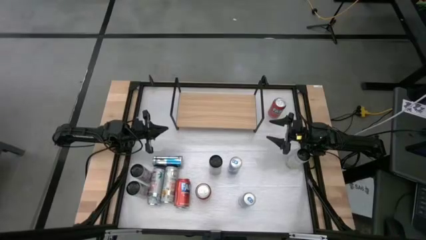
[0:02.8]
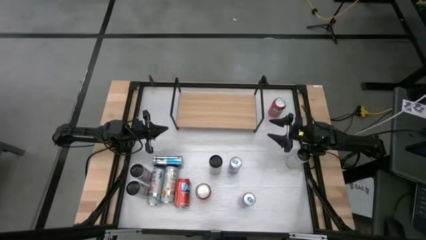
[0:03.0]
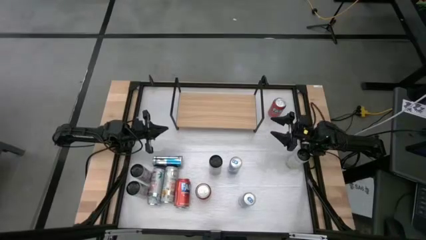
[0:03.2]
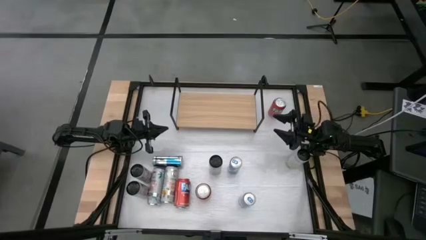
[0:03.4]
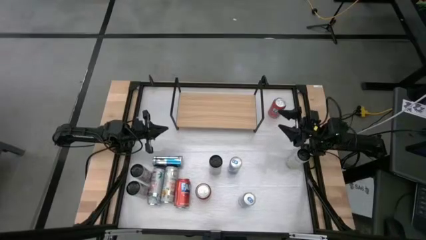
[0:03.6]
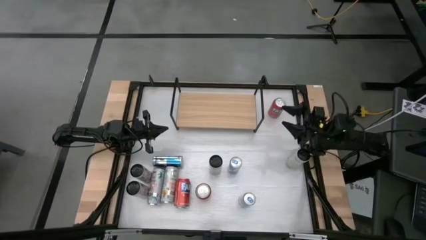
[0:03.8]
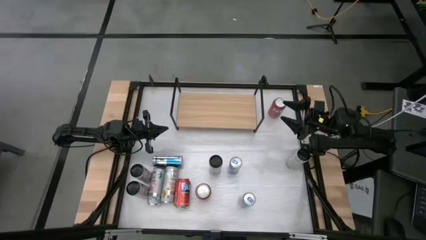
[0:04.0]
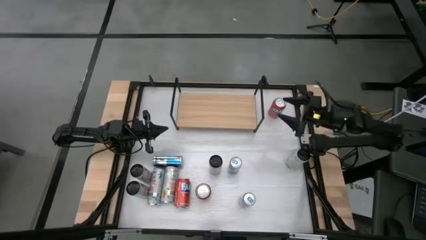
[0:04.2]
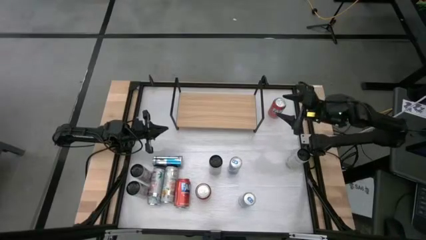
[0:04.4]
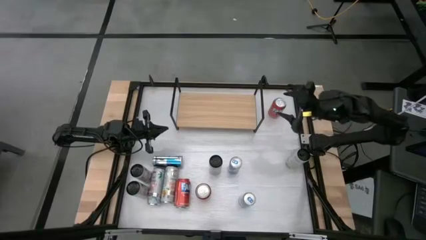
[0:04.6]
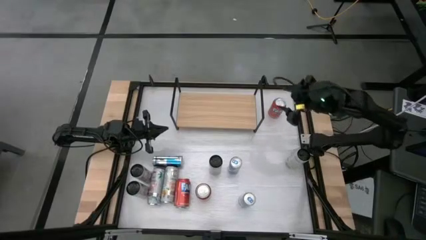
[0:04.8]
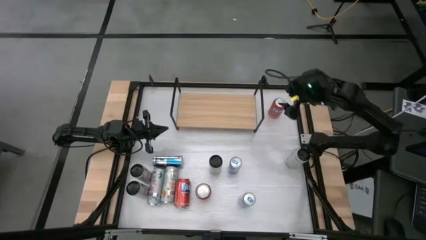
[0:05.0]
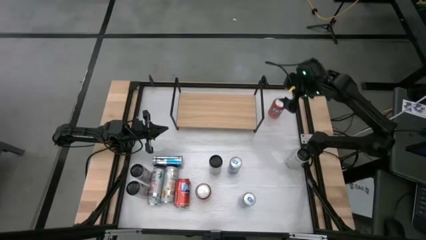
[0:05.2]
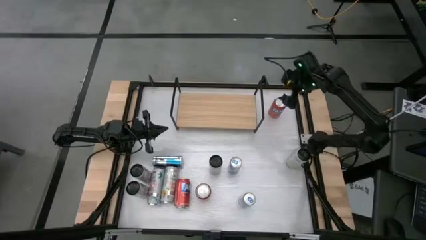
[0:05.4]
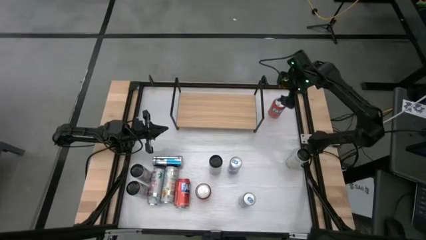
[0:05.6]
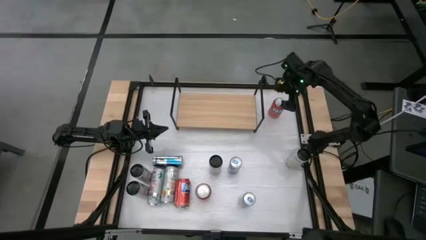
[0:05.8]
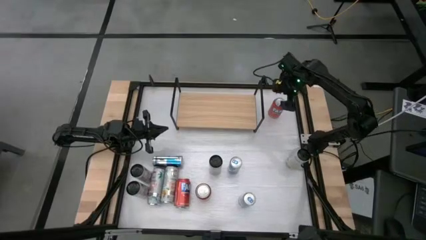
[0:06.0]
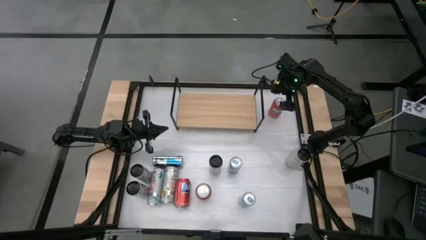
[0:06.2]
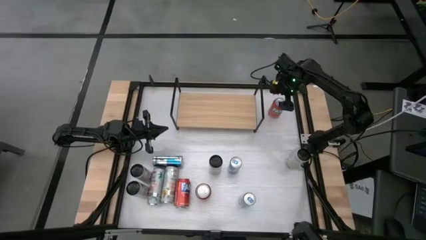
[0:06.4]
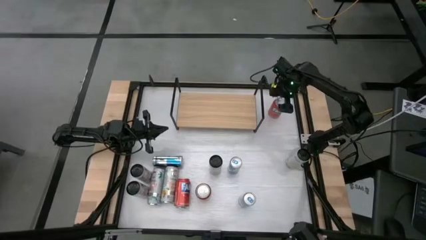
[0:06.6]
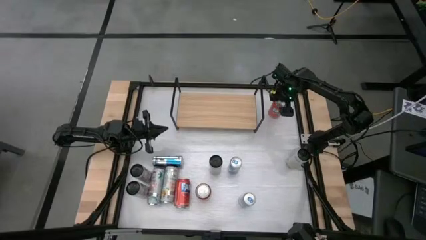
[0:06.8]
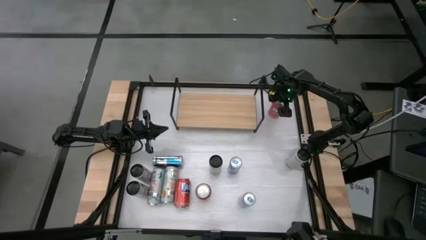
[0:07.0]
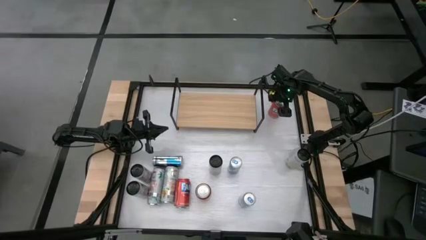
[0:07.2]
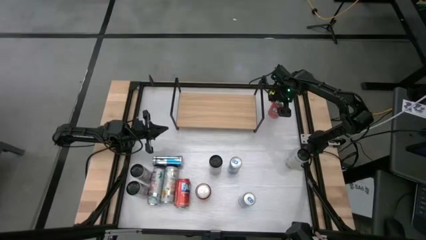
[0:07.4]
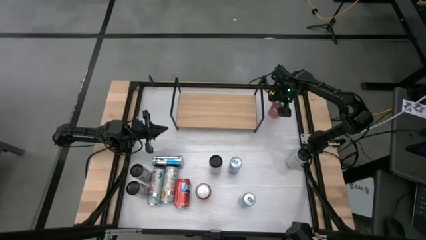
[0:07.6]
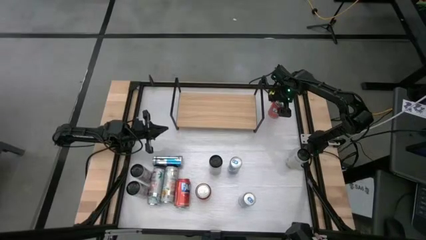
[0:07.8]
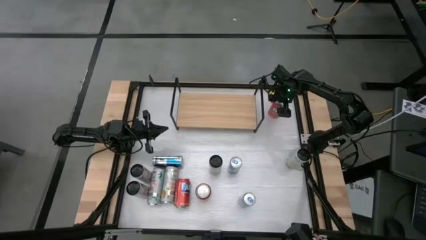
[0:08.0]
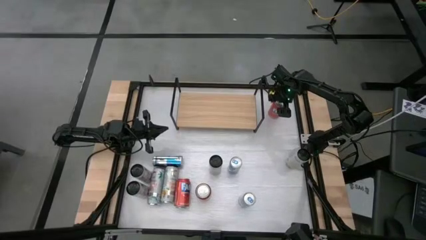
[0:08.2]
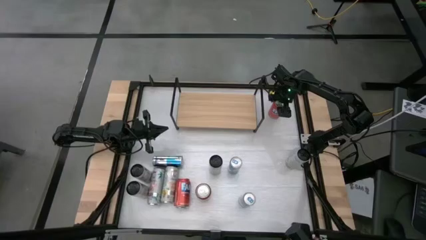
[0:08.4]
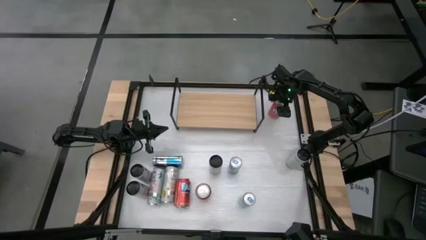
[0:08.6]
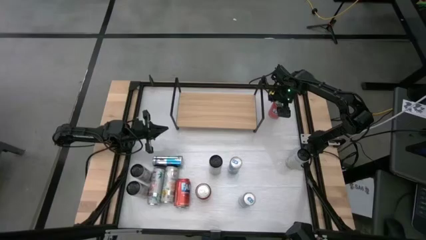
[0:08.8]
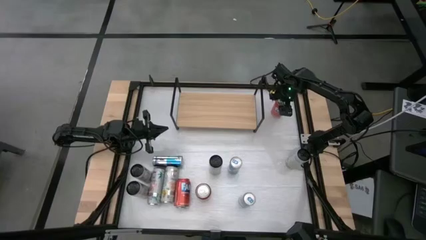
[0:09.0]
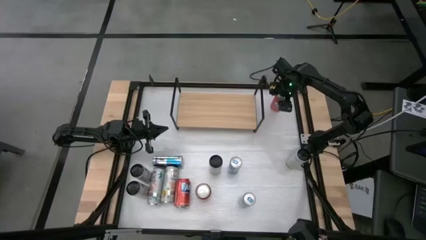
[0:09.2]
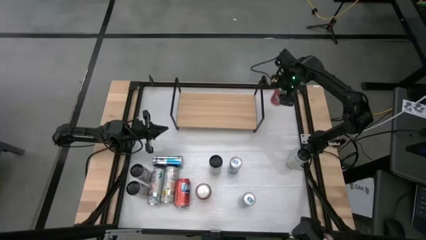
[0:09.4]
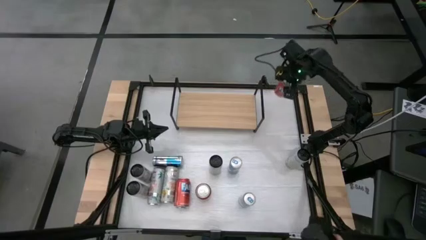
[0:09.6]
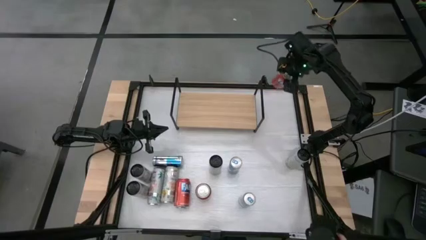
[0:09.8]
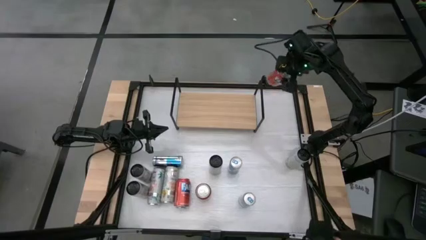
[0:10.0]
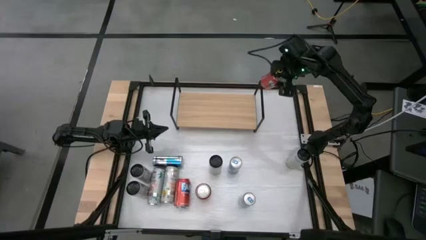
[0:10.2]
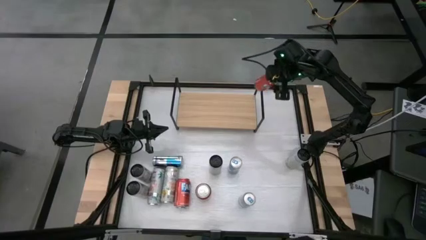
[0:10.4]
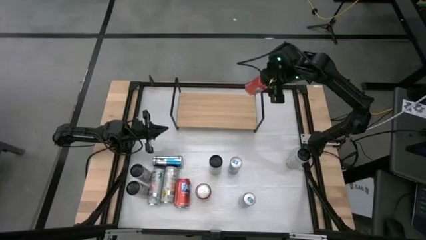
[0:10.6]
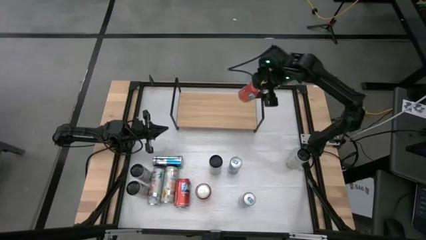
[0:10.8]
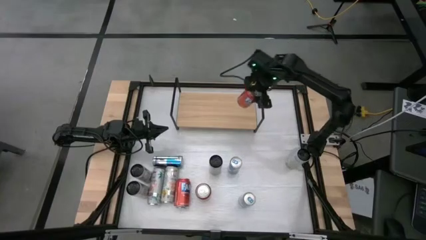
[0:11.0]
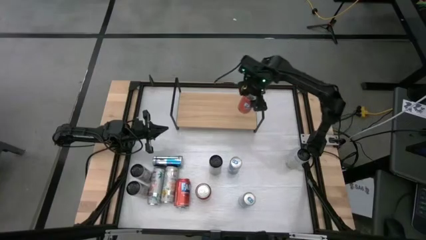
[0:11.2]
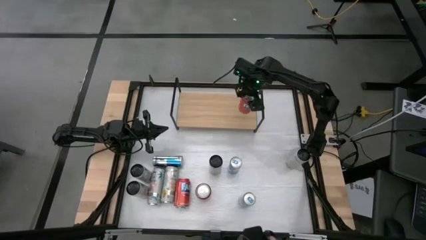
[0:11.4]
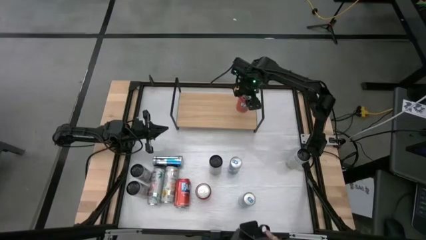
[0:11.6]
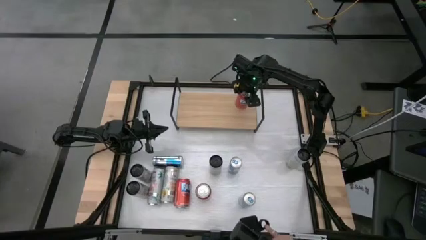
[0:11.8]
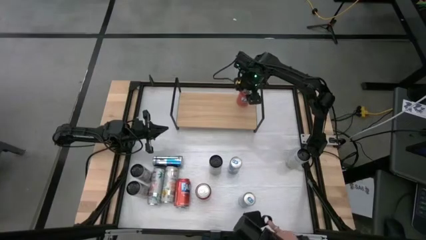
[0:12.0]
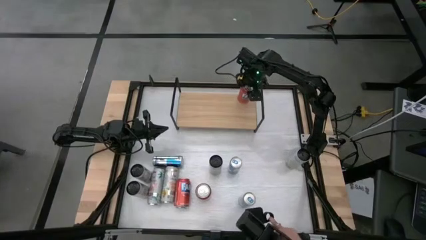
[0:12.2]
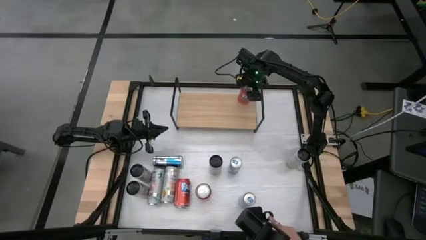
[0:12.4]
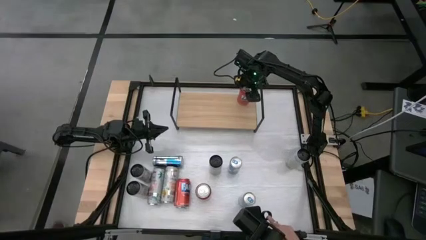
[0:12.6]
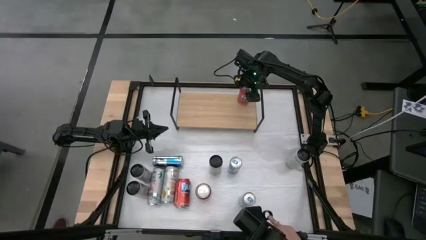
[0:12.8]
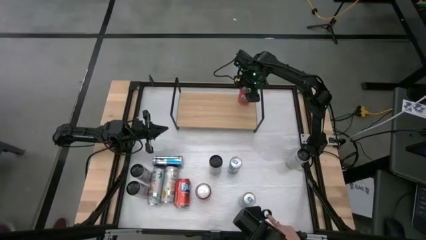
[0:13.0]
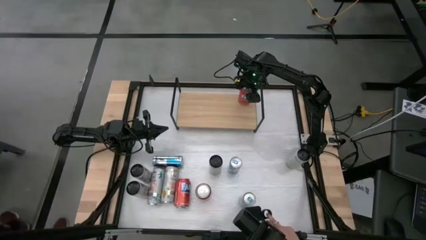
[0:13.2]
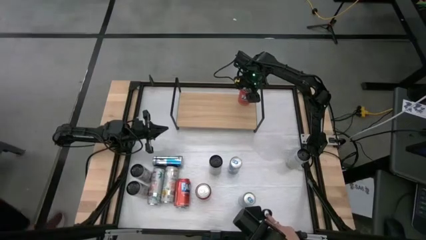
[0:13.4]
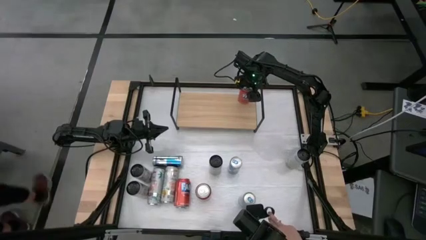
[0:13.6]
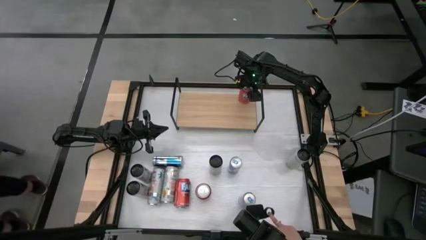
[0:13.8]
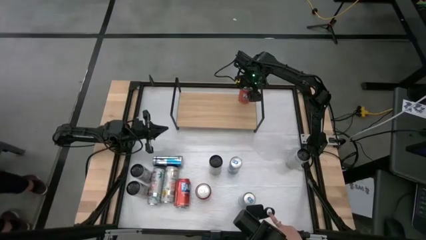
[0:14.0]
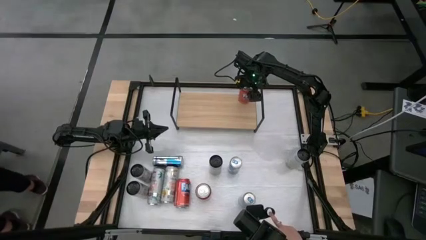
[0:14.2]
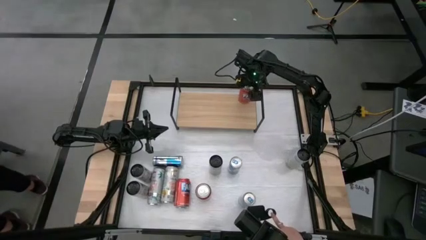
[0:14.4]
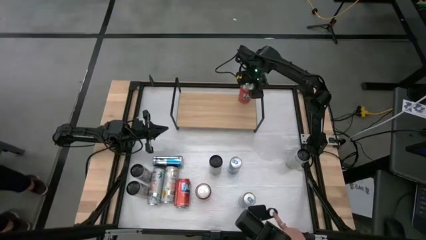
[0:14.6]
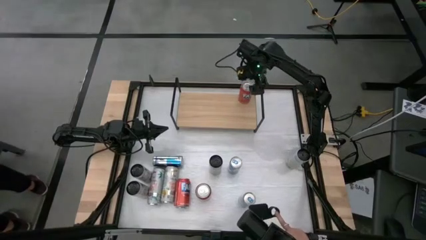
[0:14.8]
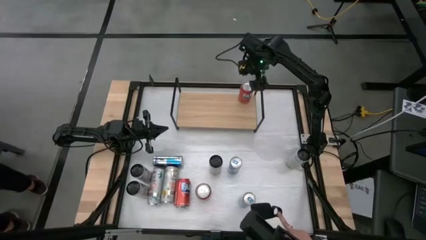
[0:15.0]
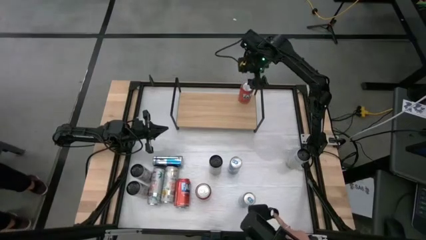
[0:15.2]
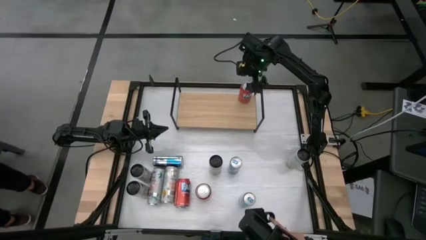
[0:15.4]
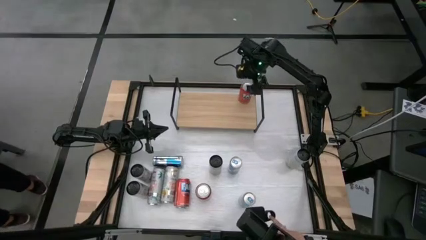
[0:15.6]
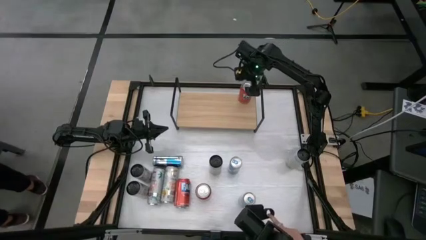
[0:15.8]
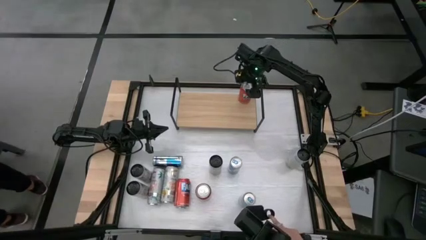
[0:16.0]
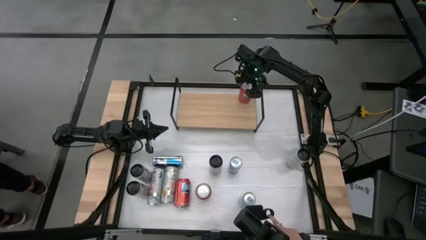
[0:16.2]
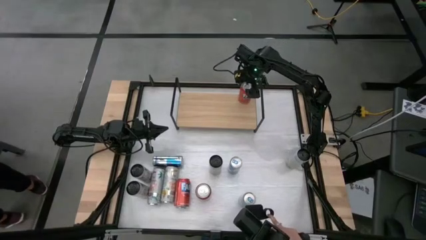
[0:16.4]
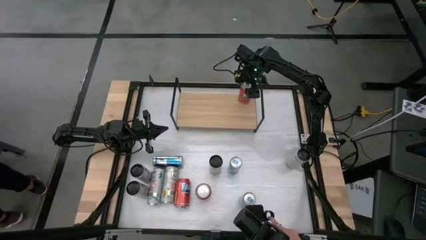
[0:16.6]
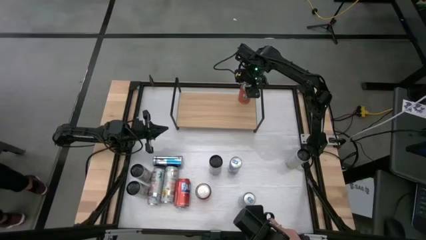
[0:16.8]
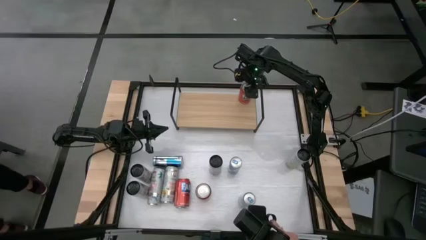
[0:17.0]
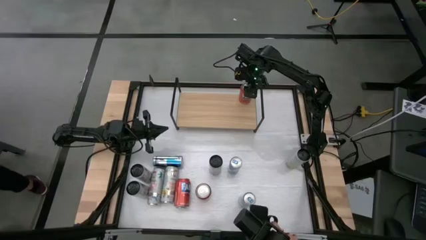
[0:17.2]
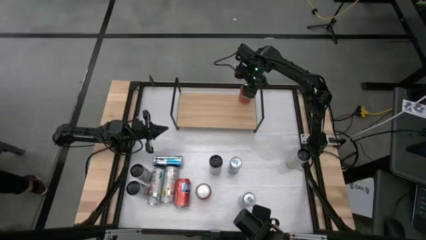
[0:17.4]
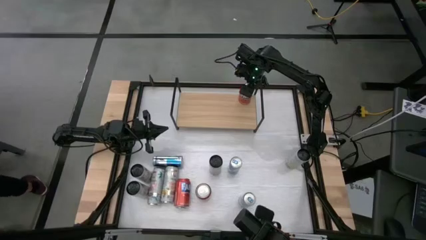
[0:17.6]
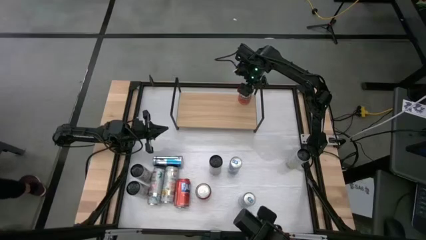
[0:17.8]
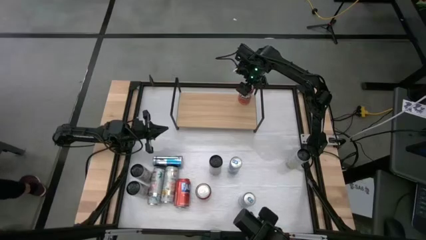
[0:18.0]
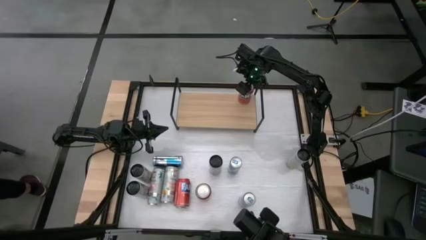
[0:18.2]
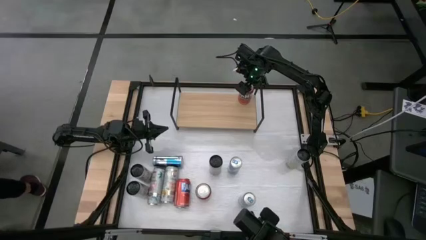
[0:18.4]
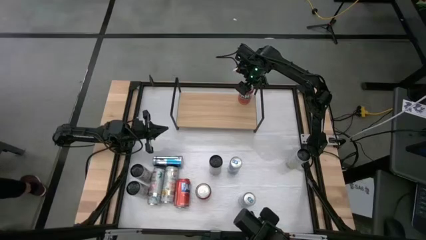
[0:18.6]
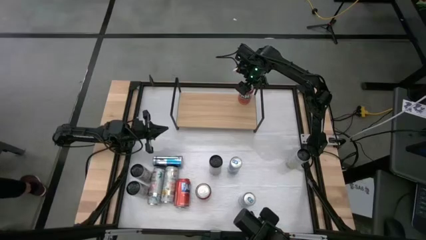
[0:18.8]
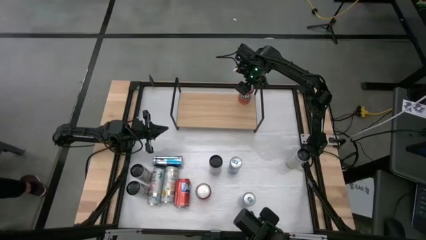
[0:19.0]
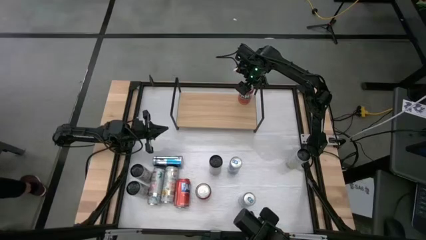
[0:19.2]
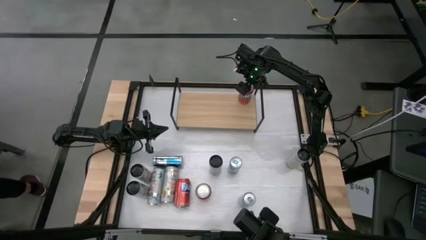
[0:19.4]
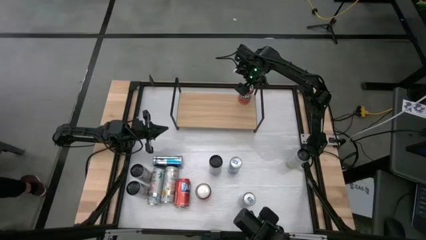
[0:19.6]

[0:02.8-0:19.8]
Task: Place canned beverage on shelf
Put the top red soda can on the shelf
